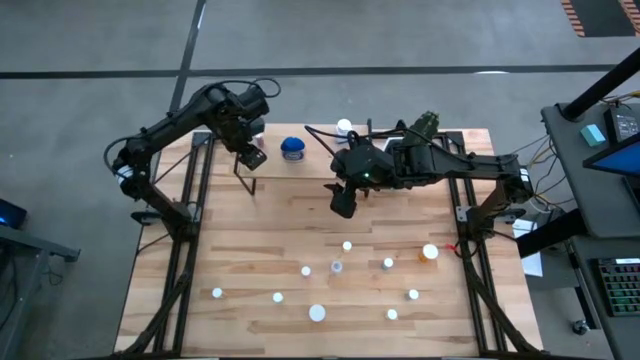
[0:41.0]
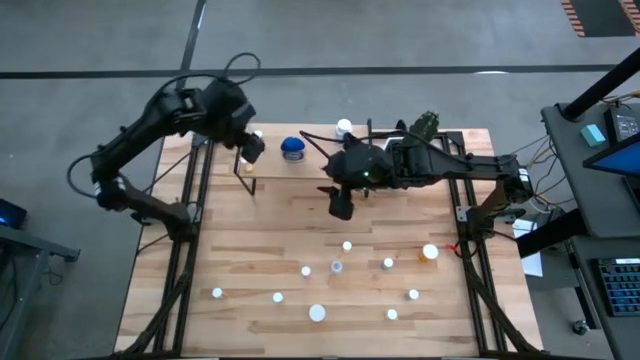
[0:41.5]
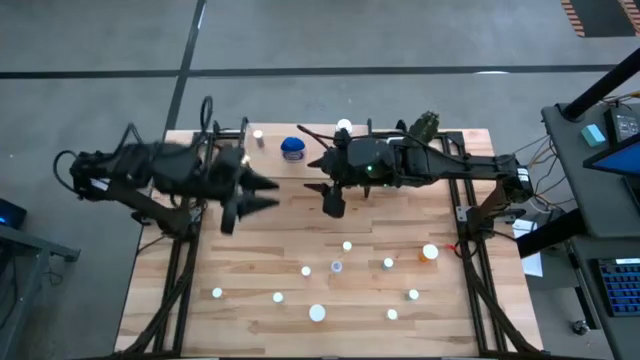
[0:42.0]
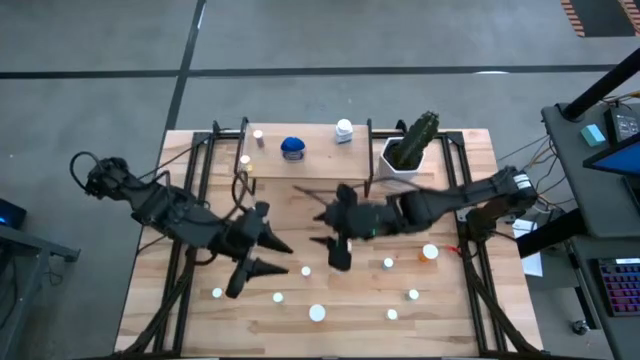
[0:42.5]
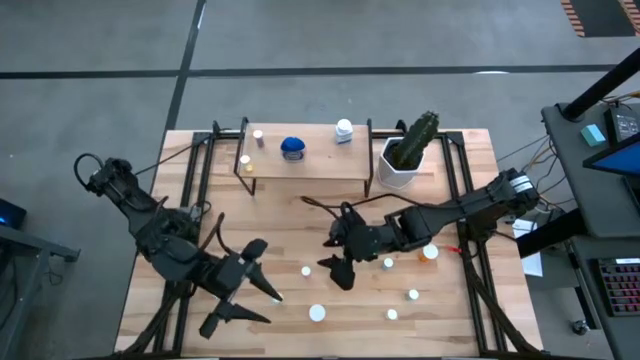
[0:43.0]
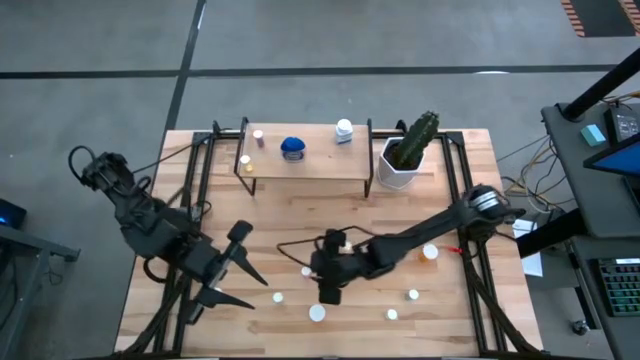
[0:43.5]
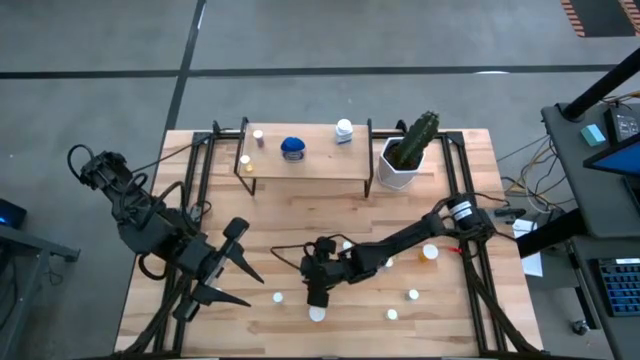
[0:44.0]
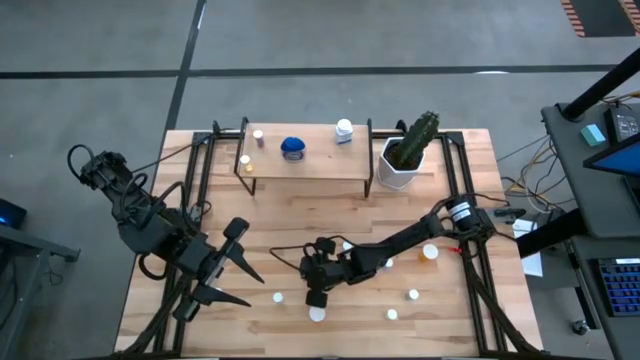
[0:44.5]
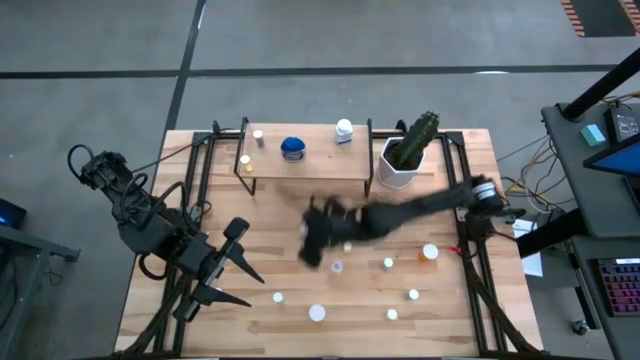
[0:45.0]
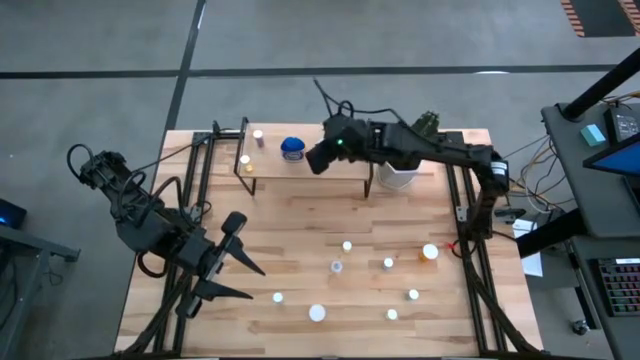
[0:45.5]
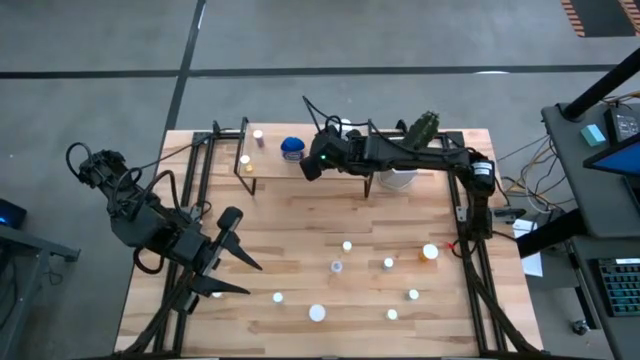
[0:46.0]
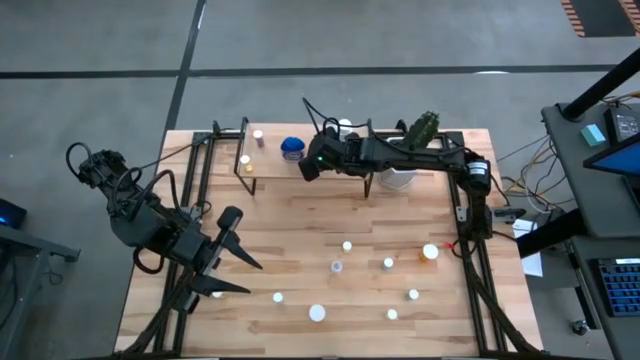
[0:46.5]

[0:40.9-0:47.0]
Task: Pick and place medicine bottles onto shelf by color
Put the pink pill bottle on the shelf

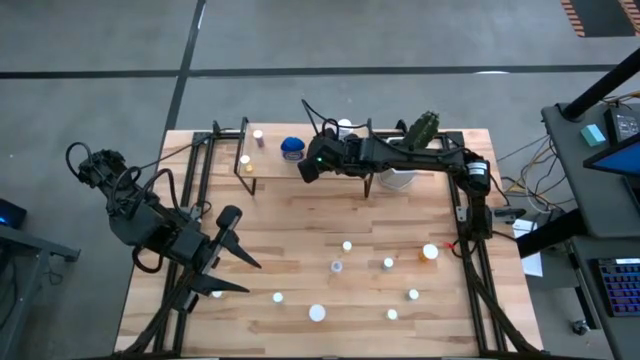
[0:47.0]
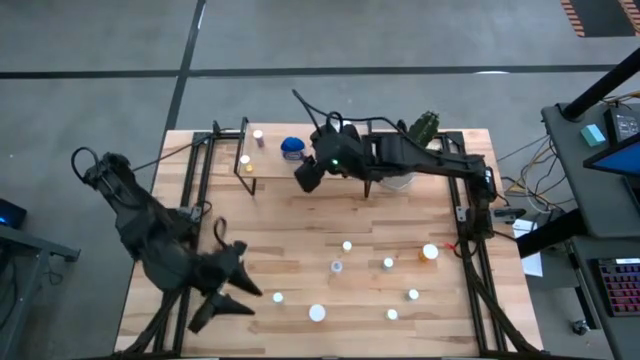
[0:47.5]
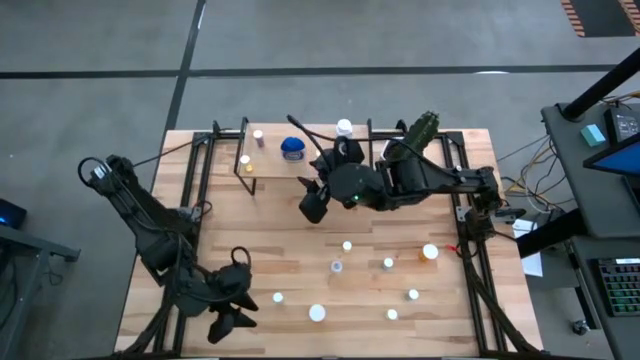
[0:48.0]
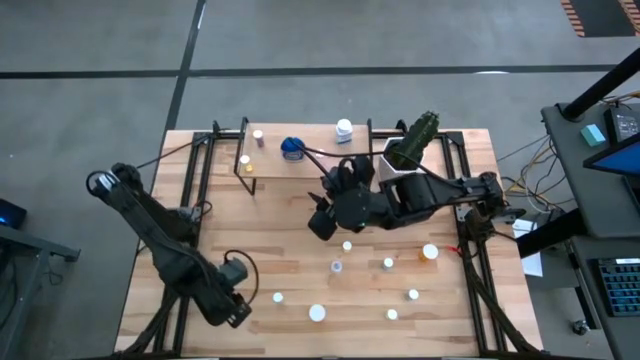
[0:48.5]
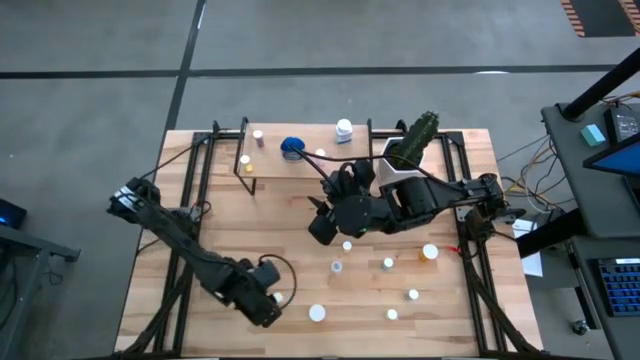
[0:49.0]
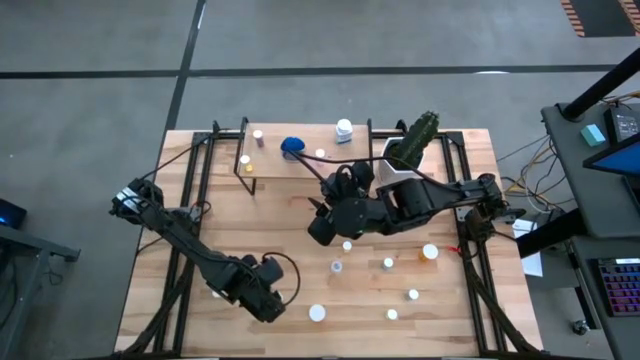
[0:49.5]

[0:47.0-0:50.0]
Put the yellow pill bottle on the shelf

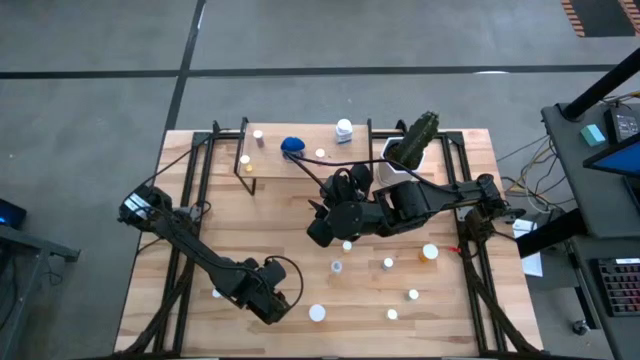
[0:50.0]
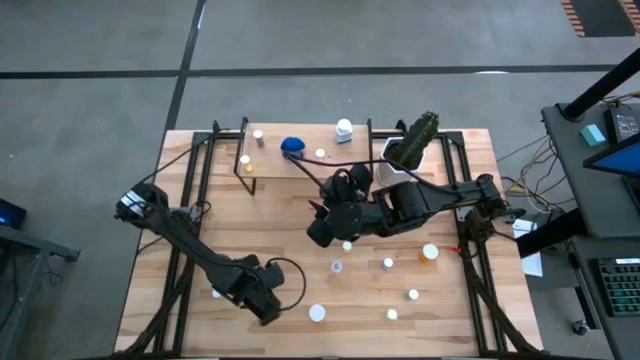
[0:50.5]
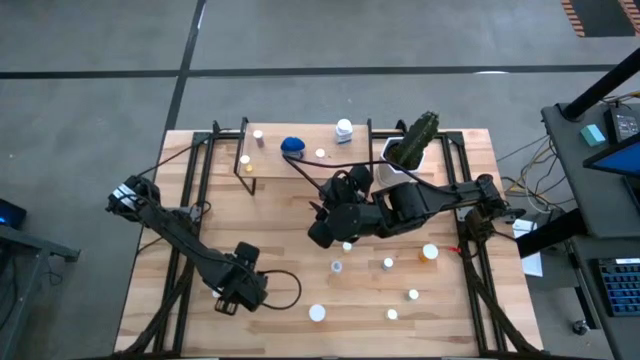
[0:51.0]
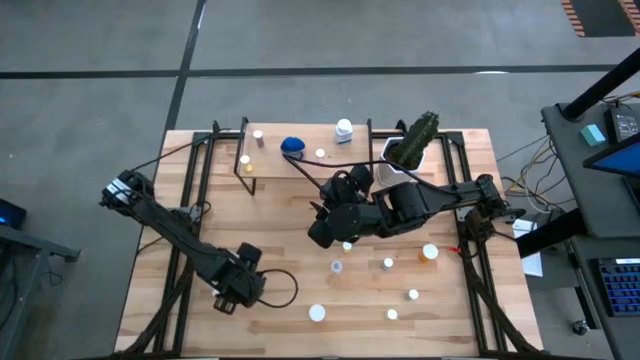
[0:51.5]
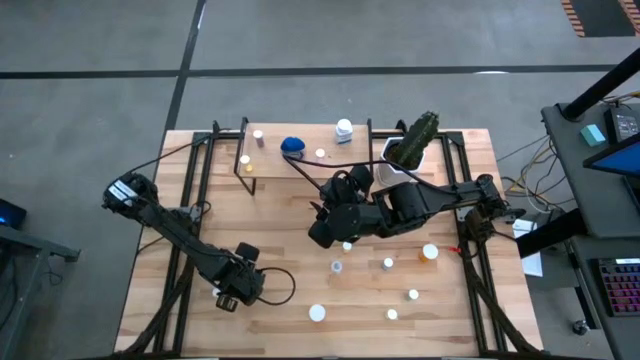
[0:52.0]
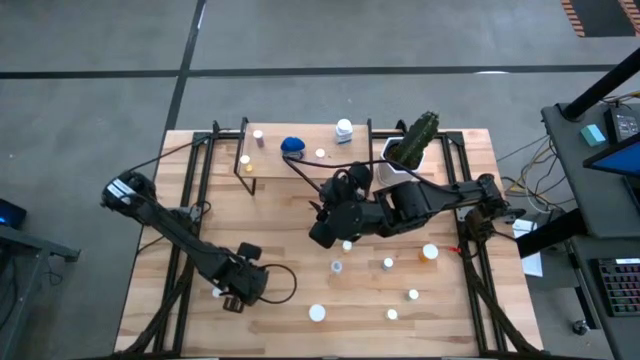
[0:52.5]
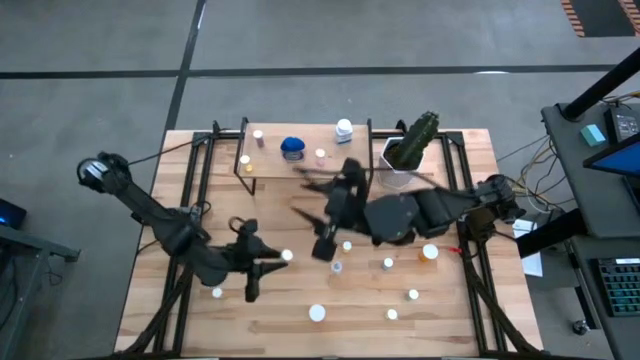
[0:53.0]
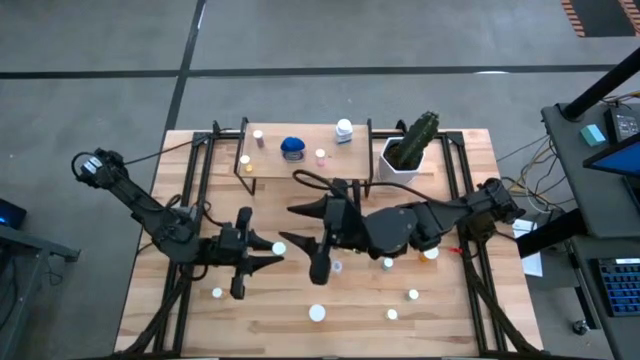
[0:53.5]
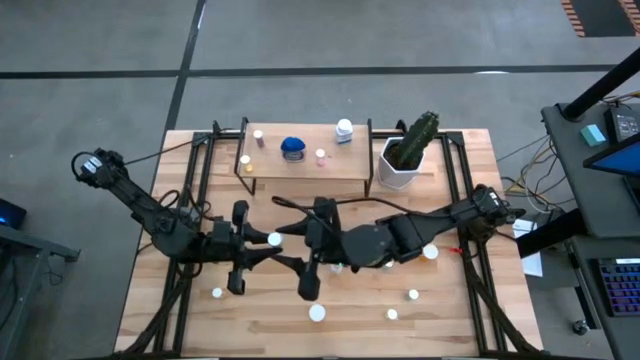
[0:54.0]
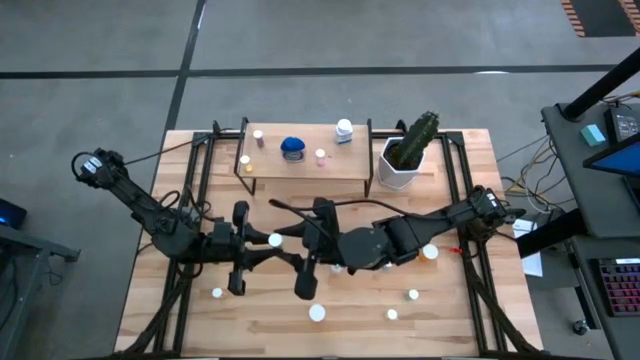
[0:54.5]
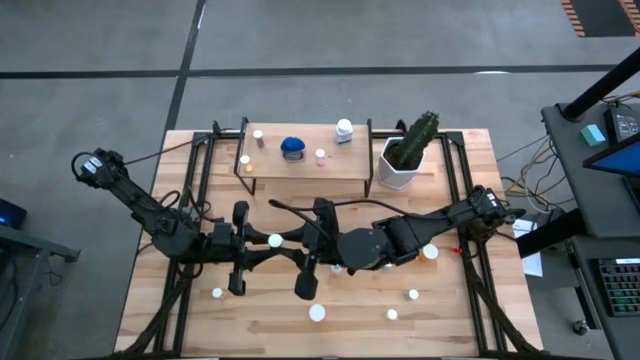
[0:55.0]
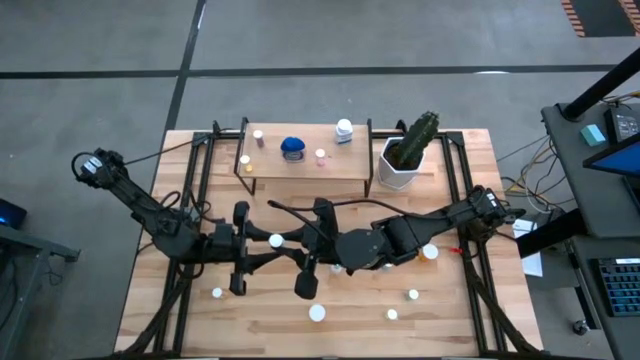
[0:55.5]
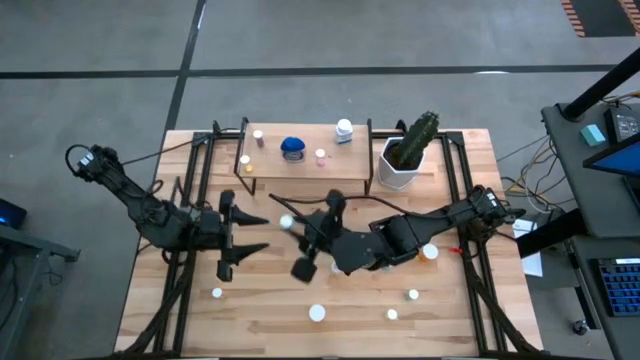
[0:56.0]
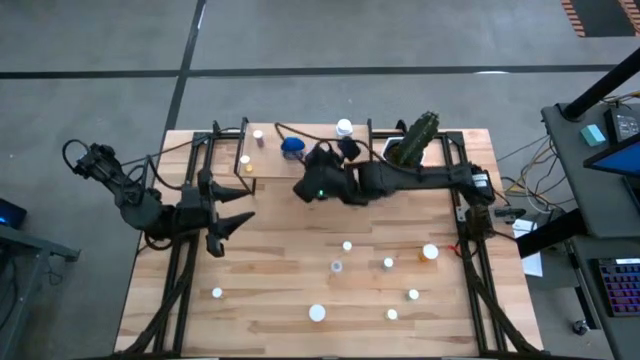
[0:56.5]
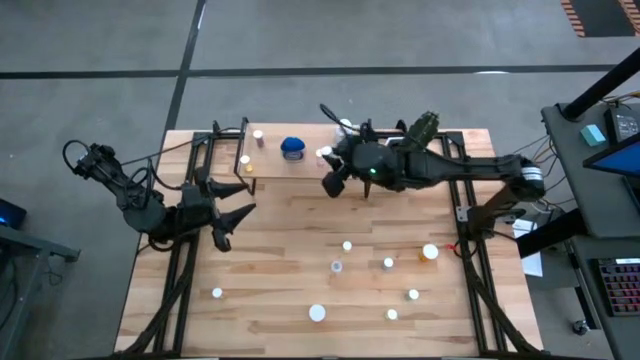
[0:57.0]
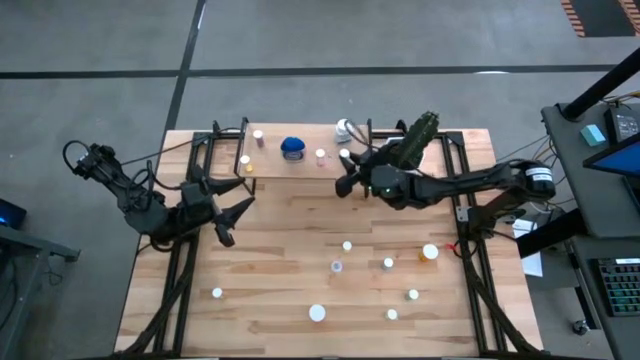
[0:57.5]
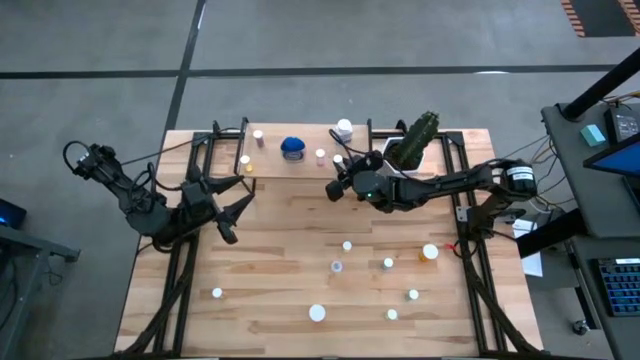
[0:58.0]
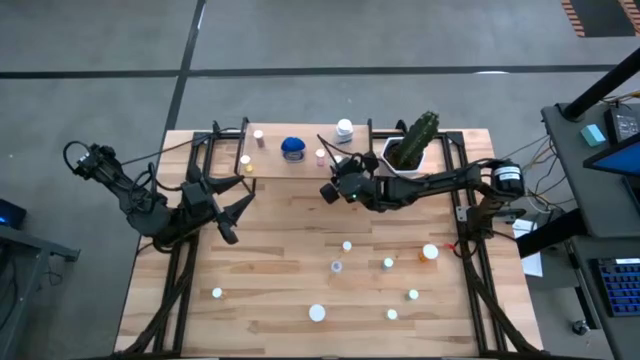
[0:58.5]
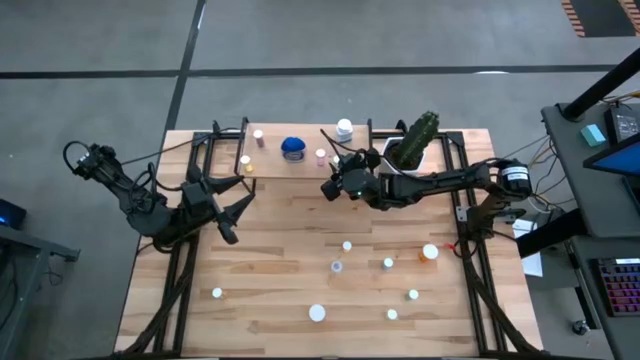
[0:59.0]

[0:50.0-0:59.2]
Put the yellow pill bottle on the shelf

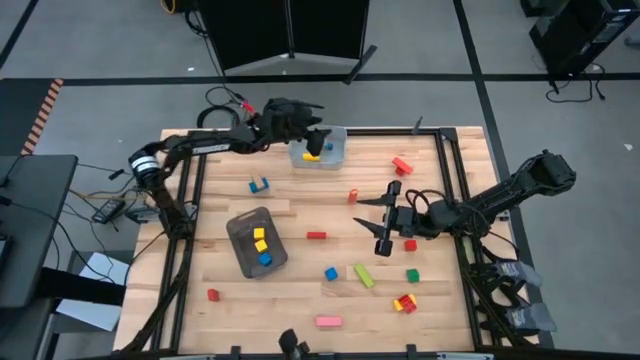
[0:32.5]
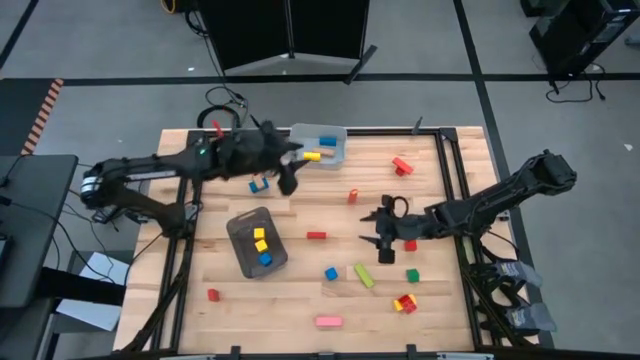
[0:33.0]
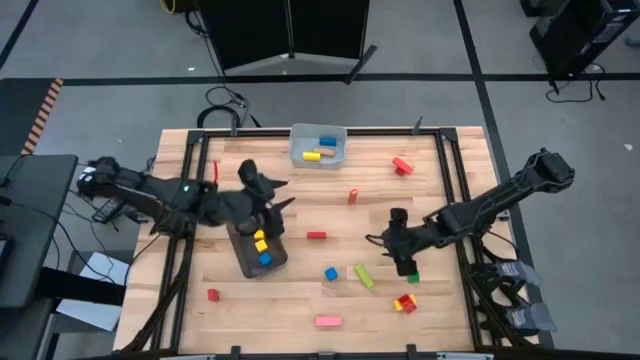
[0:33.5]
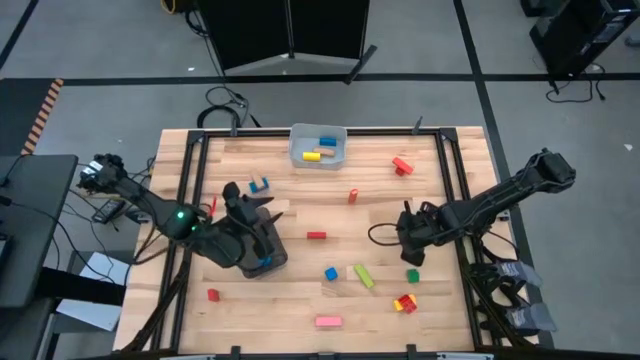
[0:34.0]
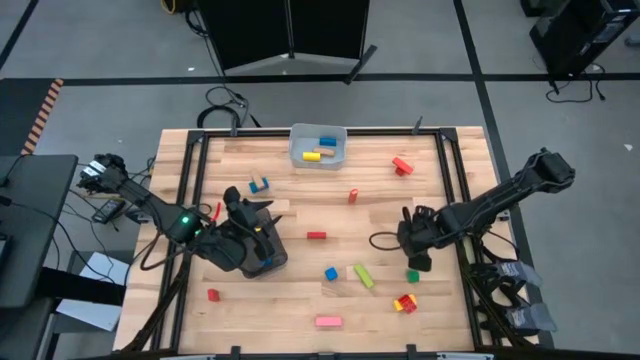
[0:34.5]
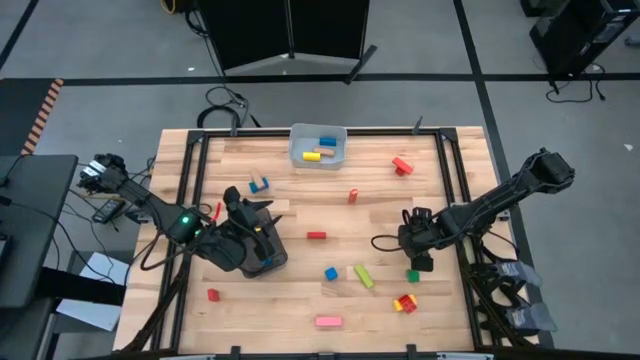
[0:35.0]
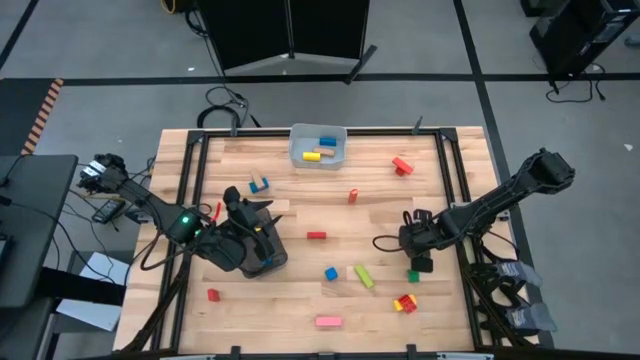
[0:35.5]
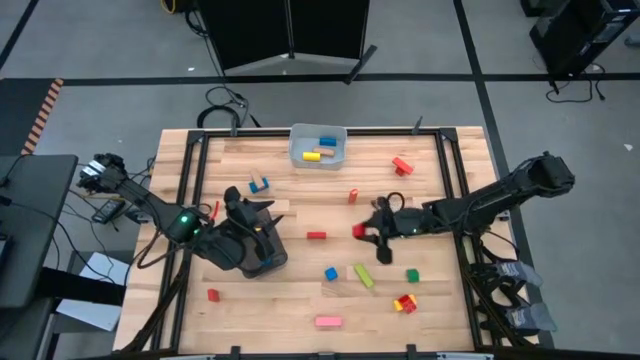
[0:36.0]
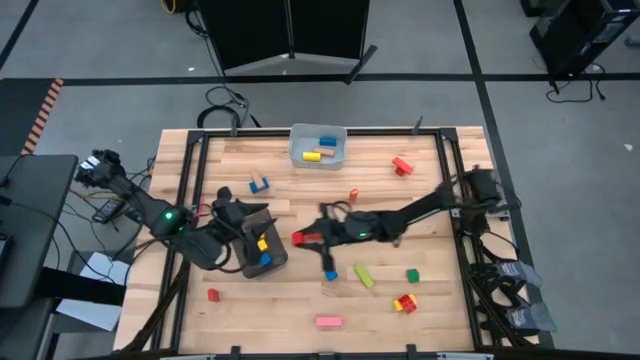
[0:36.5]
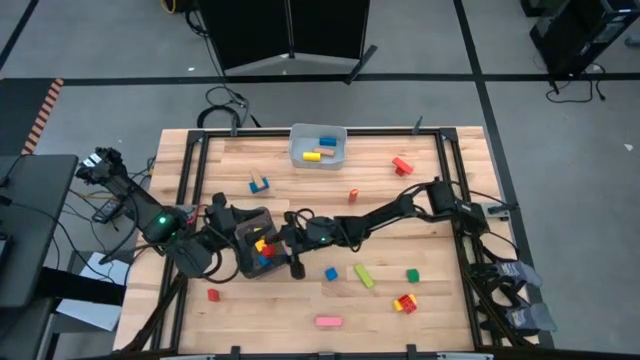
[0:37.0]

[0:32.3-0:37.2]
Task: Sort blocks by size
Put the red square block into the black bin
